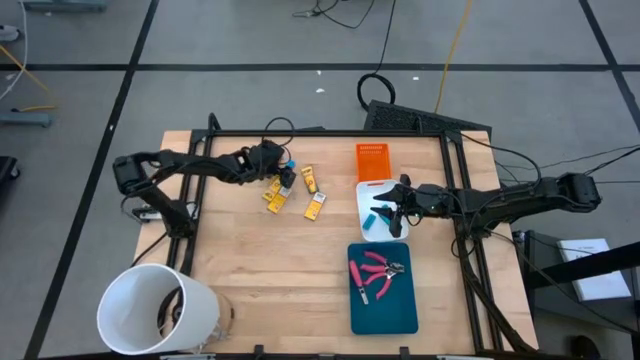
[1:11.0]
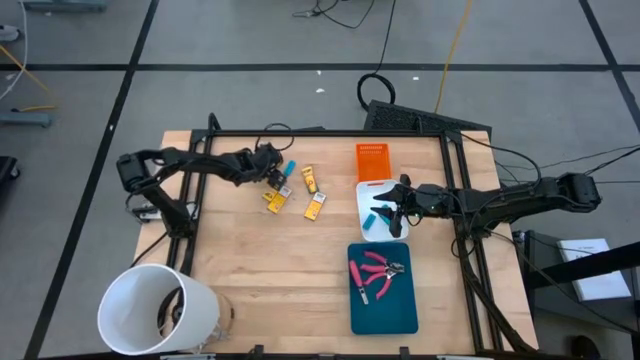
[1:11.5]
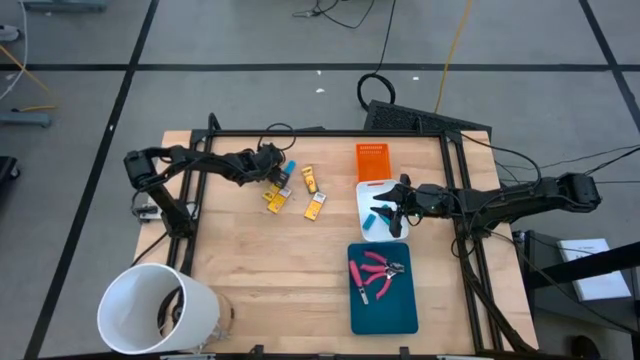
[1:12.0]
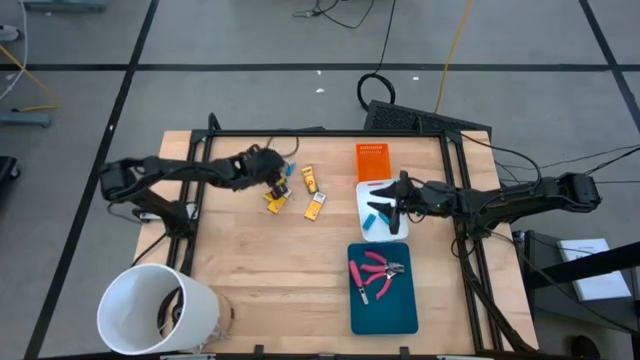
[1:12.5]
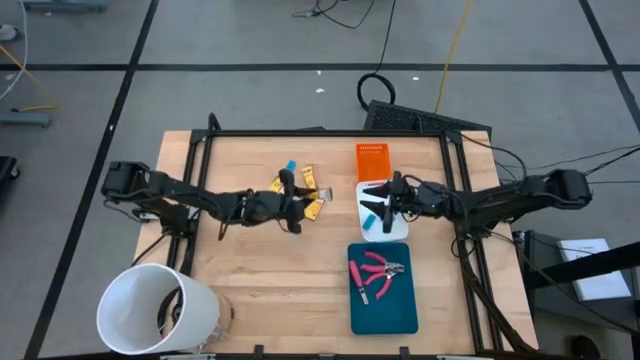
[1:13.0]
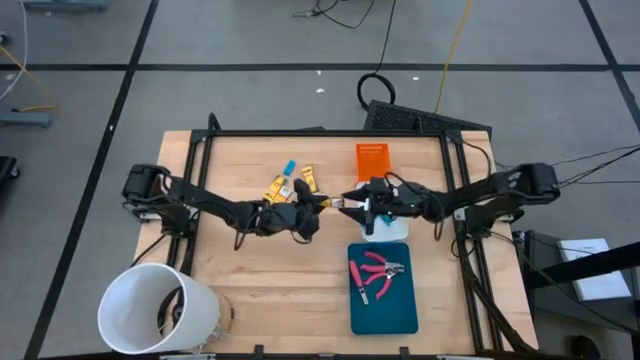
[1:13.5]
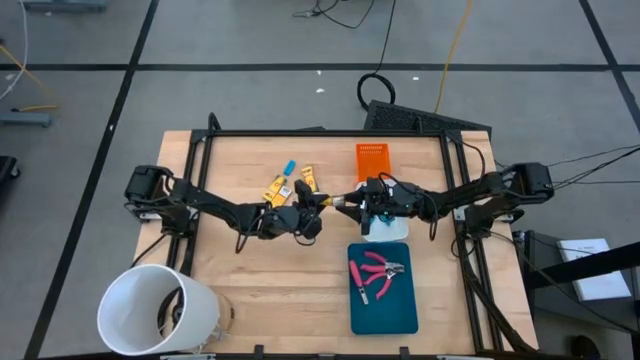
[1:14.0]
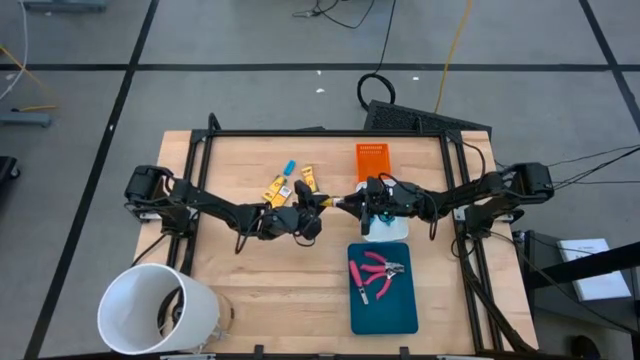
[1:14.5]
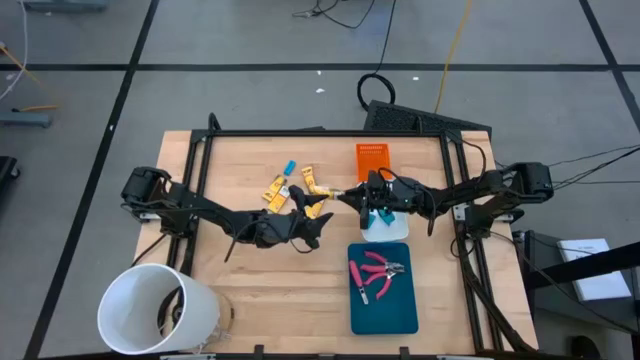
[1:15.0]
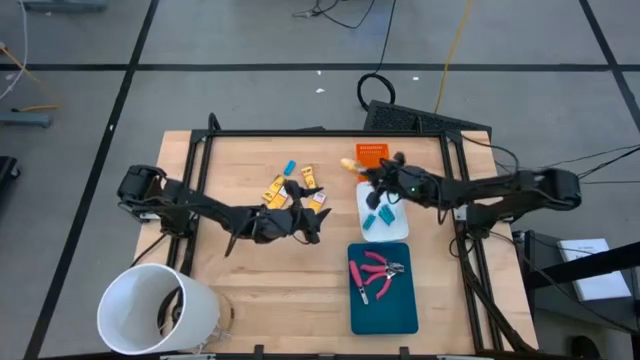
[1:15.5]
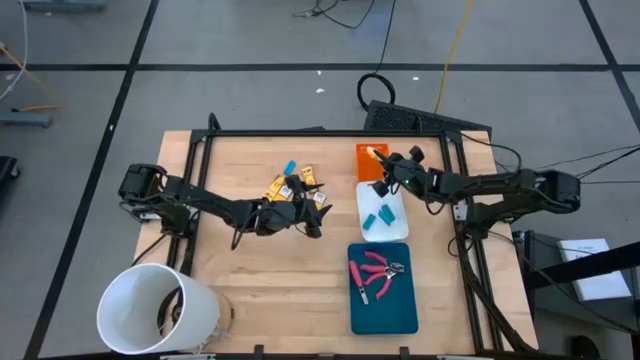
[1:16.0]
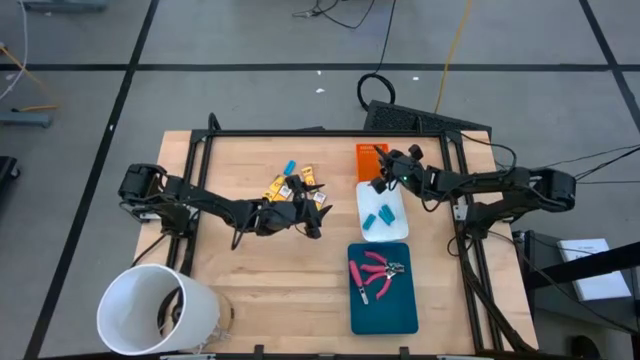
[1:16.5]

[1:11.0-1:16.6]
Task: Pick & Place School Supplies
Put the yellow crayon box into the orange bin

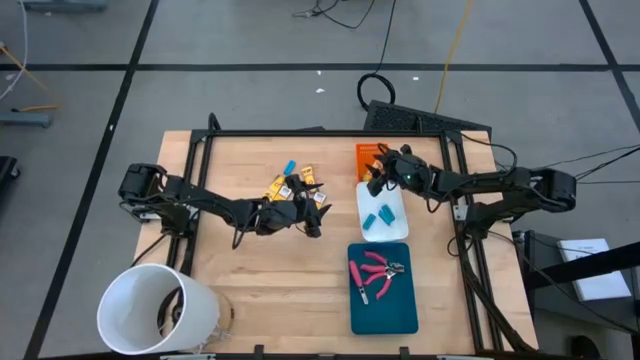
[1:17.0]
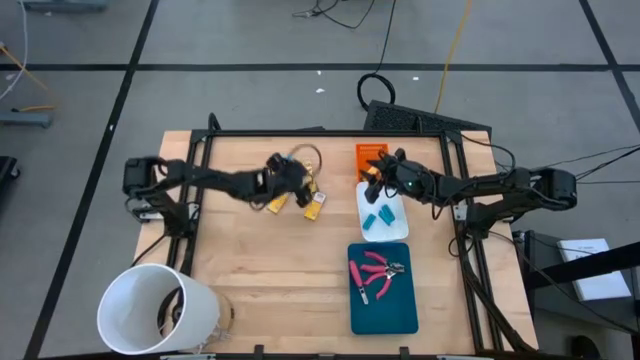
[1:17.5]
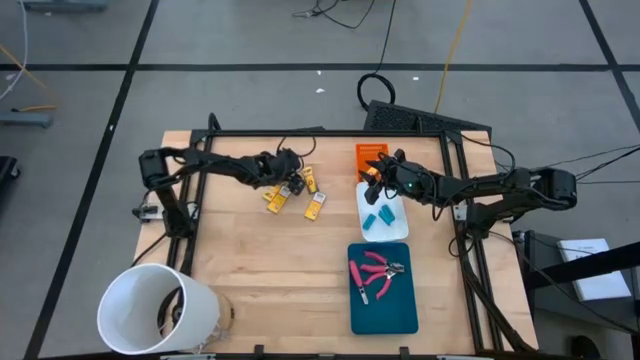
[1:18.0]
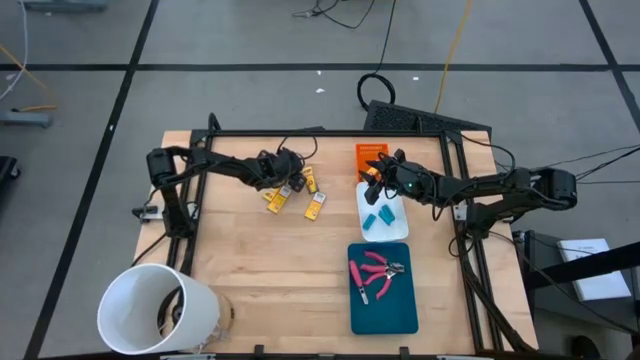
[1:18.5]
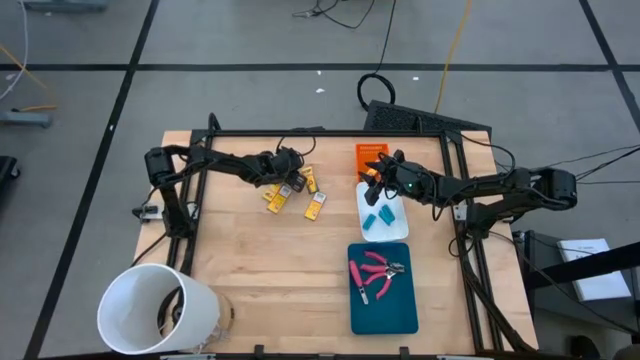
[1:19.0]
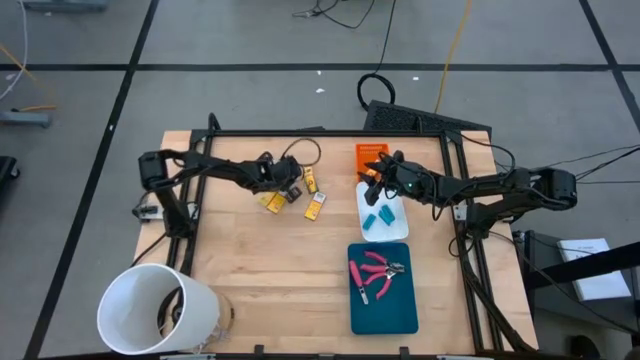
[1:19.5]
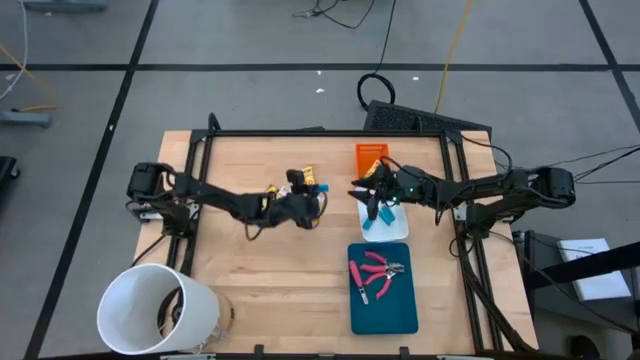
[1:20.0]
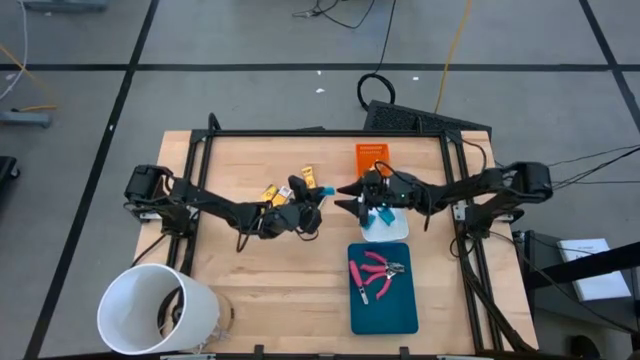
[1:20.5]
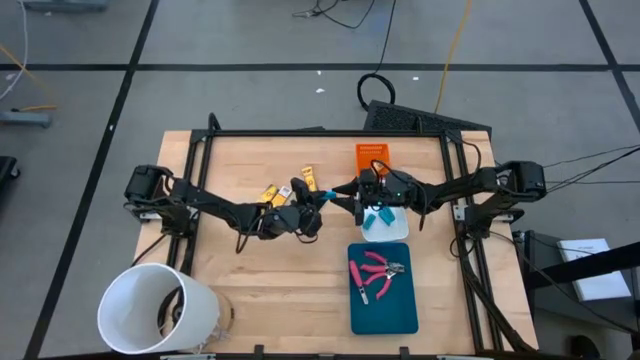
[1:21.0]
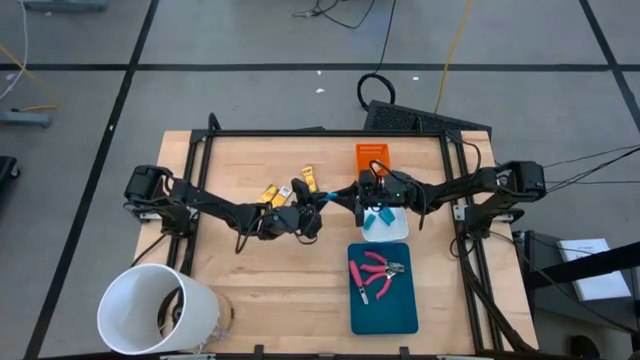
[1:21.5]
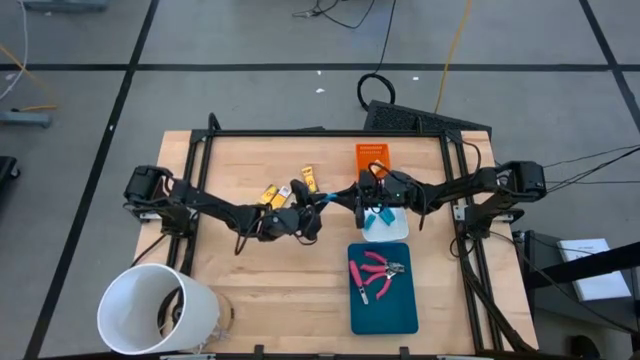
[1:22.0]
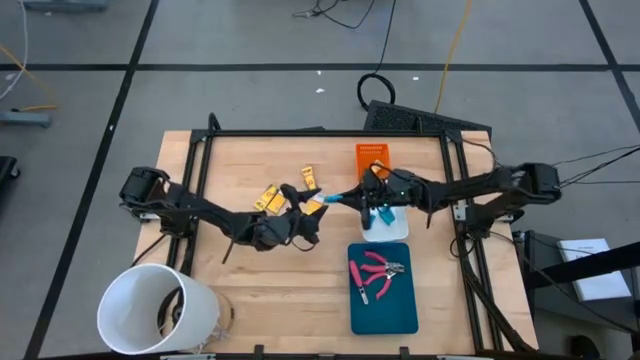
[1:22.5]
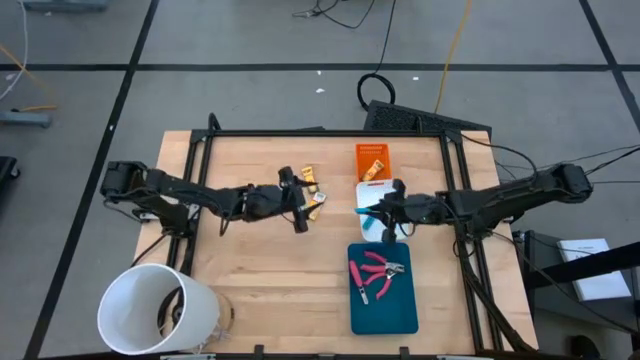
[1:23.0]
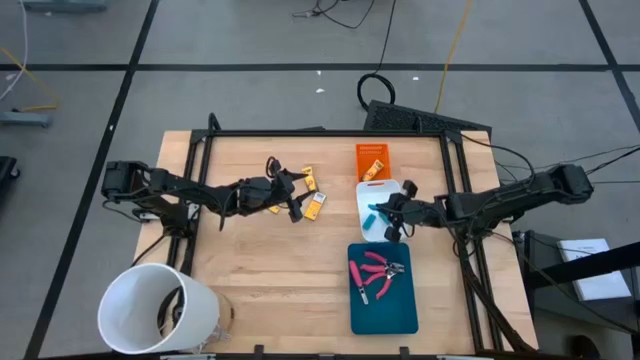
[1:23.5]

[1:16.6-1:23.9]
Put the blue eraser into the white bin

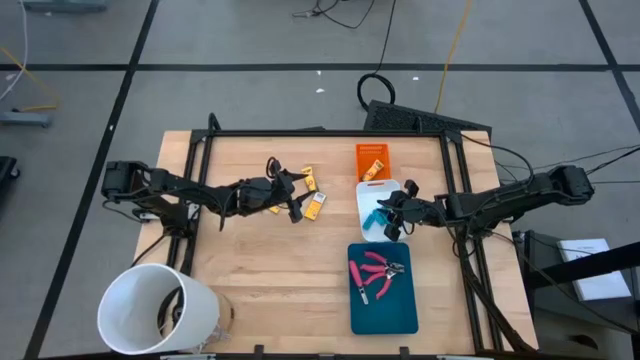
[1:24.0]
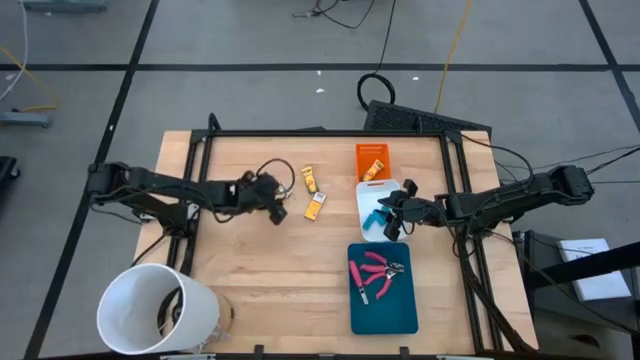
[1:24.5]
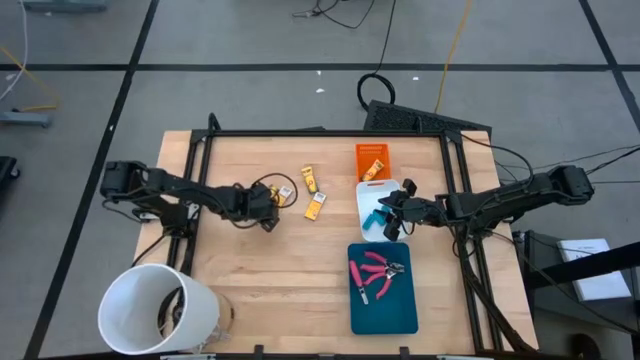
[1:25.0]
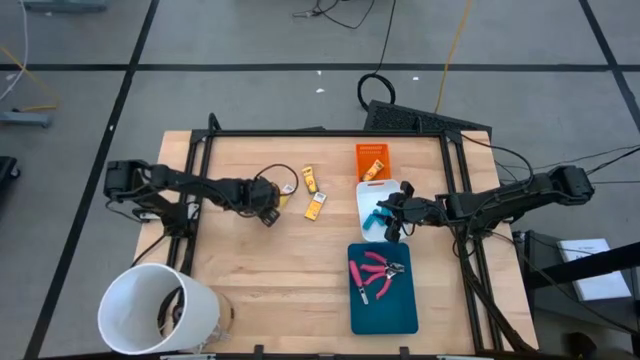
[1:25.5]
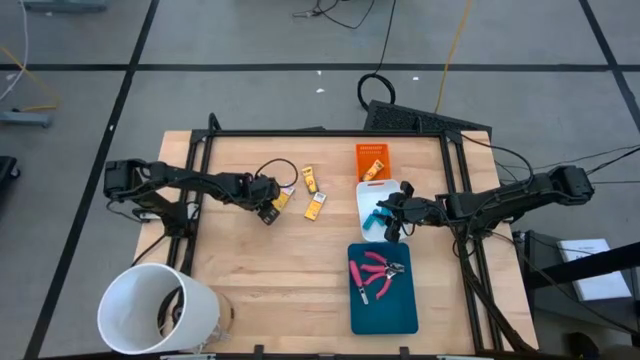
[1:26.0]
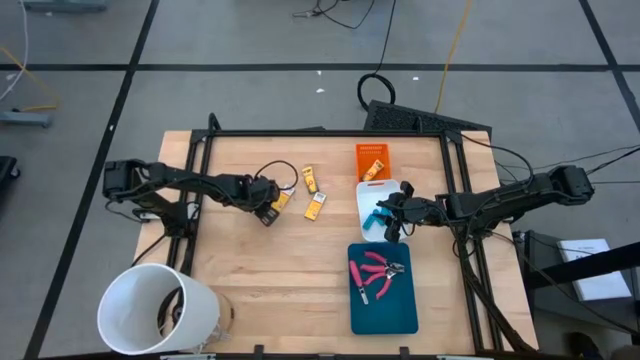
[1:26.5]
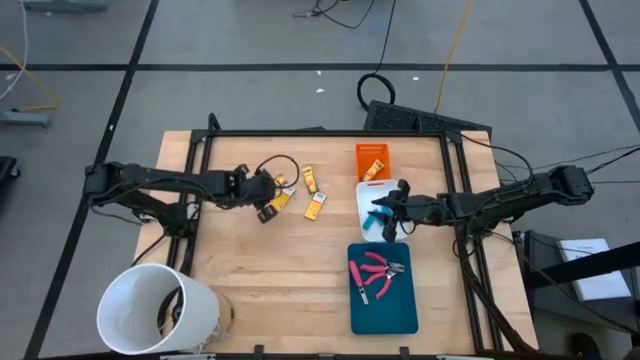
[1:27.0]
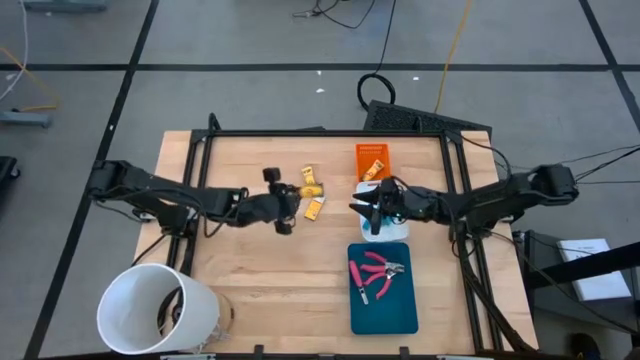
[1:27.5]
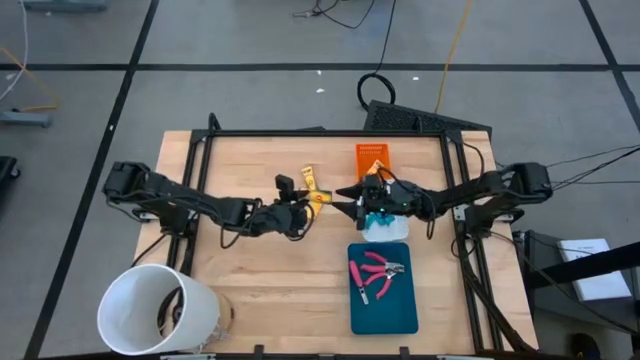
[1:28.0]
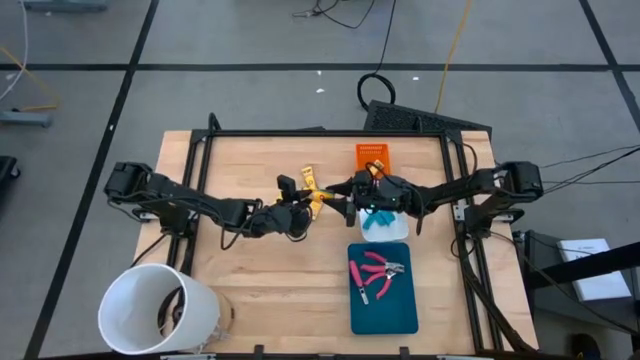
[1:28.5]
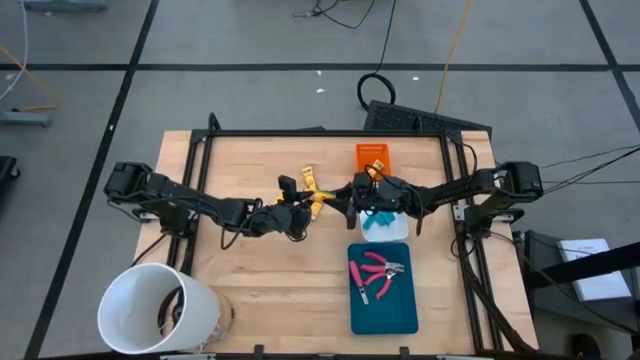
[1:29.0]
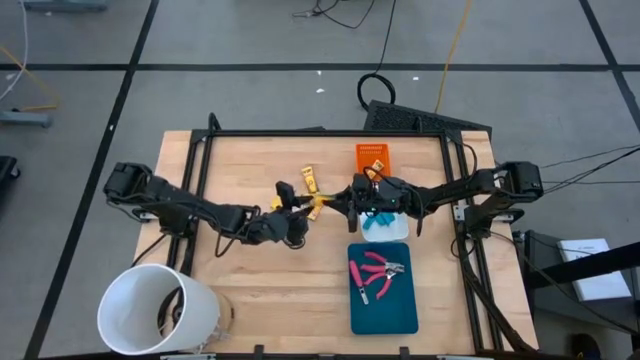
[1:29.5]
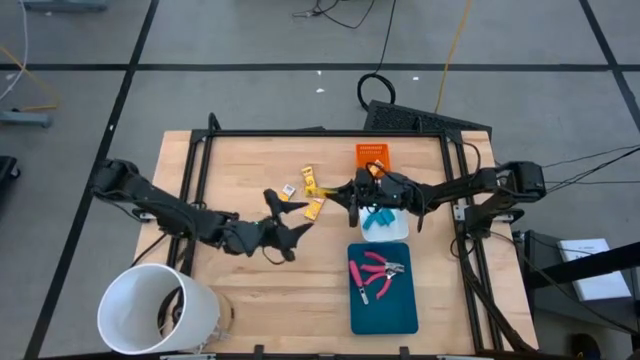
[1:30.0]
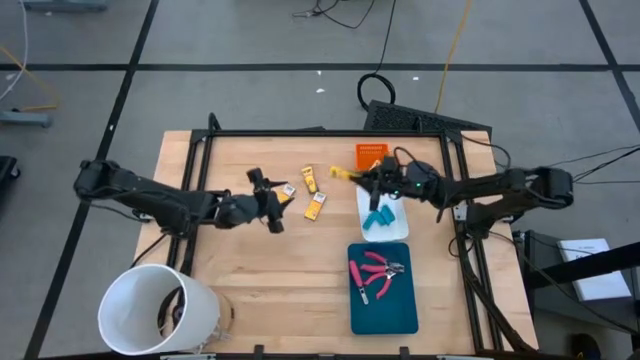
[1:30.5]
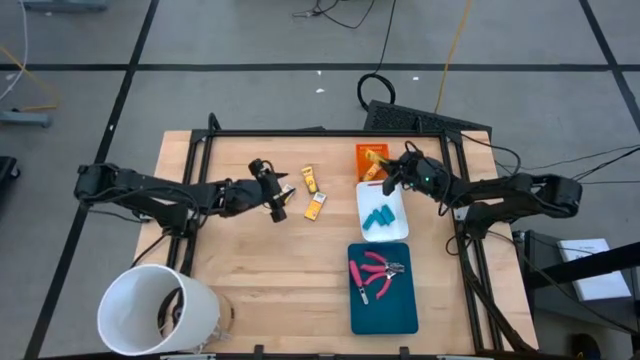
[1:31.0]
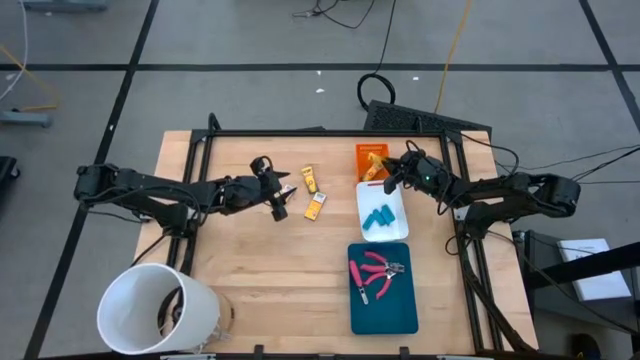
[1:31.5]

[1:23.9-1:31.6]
Put the yellow crayon box into the orange bin
